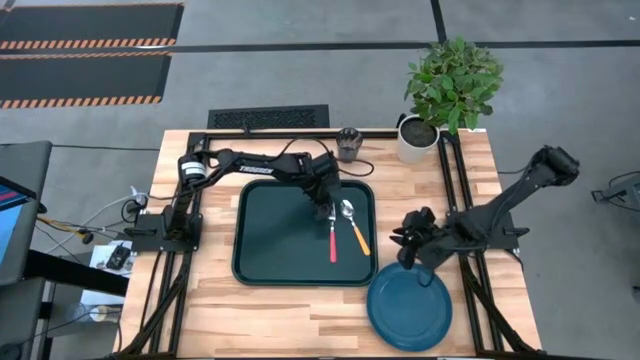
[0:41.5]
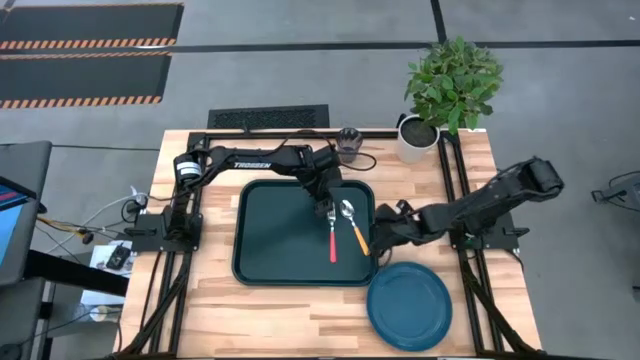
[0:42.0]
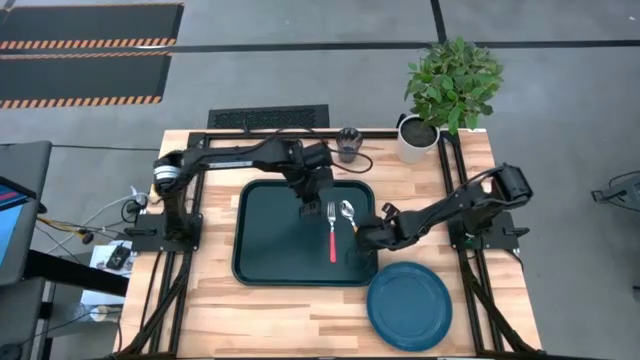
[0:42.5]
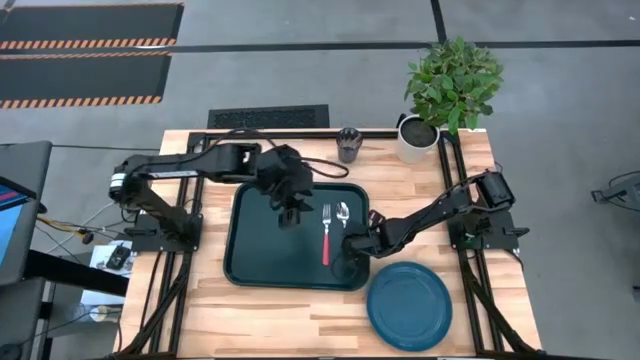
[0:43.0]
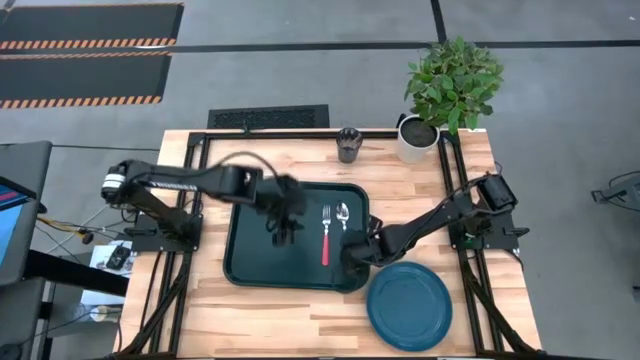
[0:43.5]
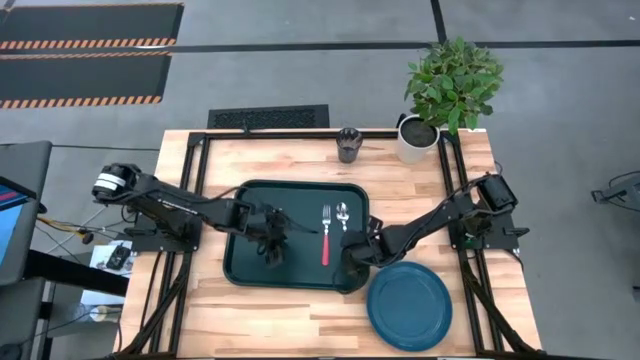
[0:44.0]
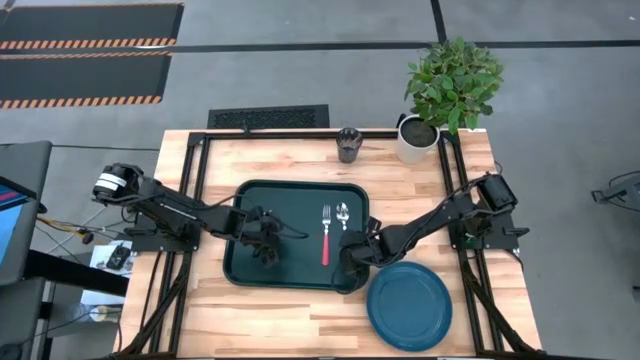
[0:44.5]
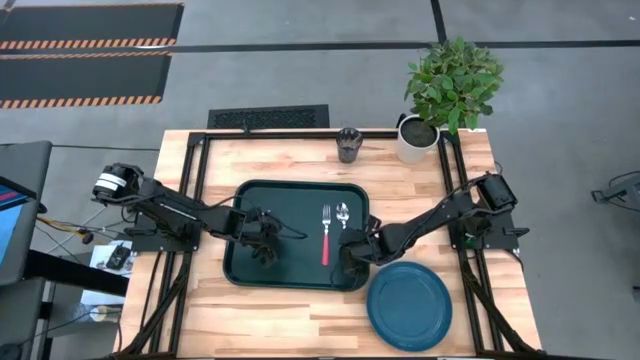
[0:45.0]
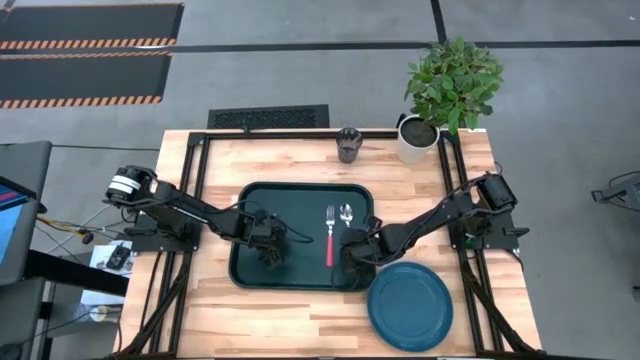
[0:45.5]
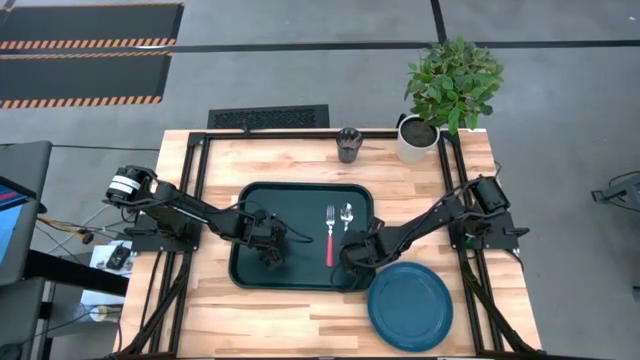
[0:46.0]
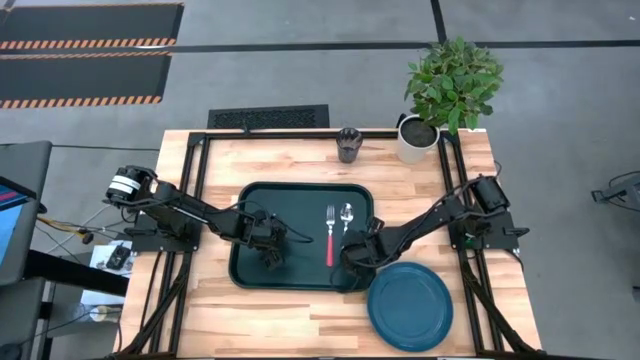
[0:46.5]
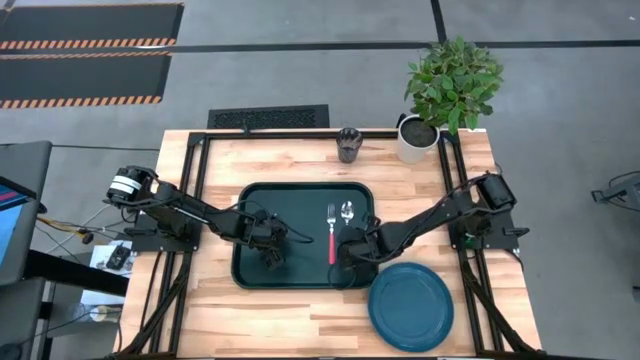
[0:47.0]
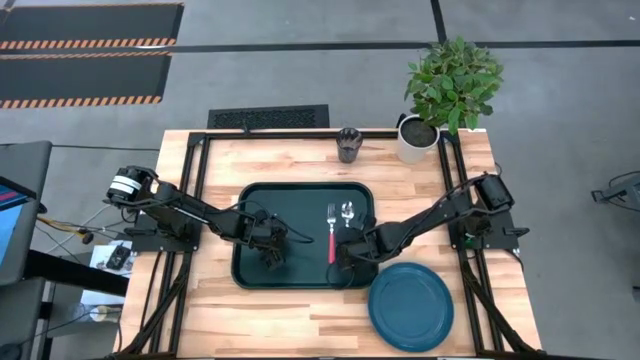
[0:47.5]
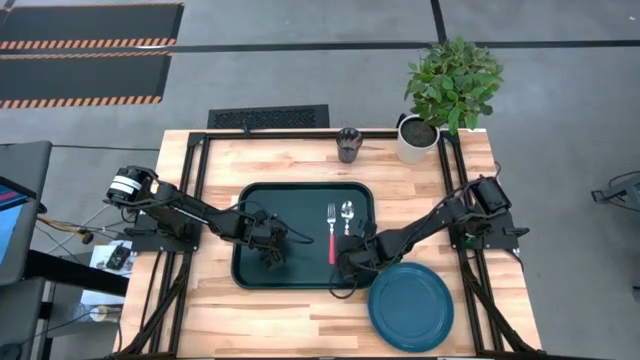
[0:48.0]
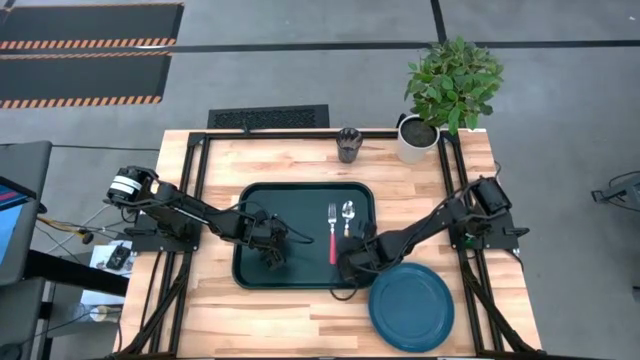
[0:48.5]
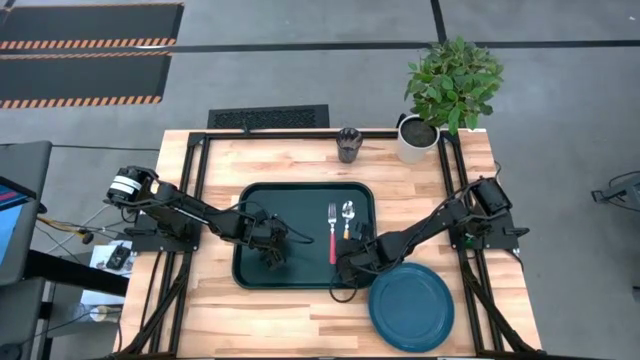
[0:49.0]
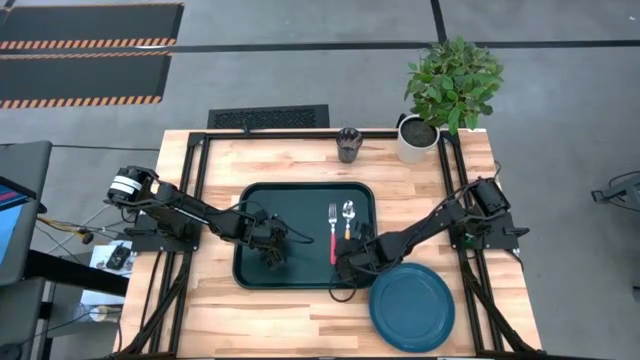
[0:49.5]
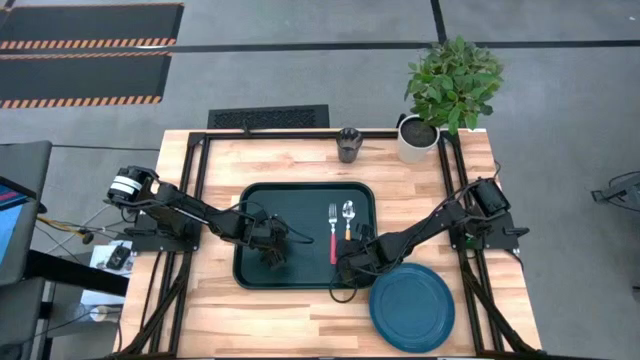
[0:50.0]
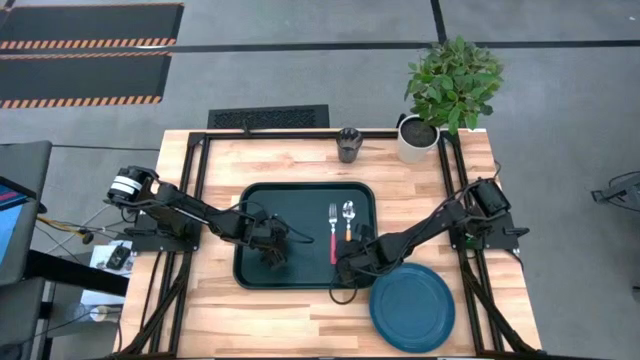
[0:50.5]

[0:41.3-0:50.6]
Task: Pick and place plate/cup/fork/spoon on tray
Adjust the yellow spoon on the black serving tray

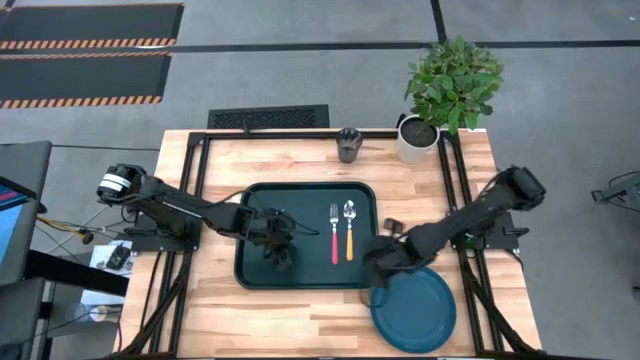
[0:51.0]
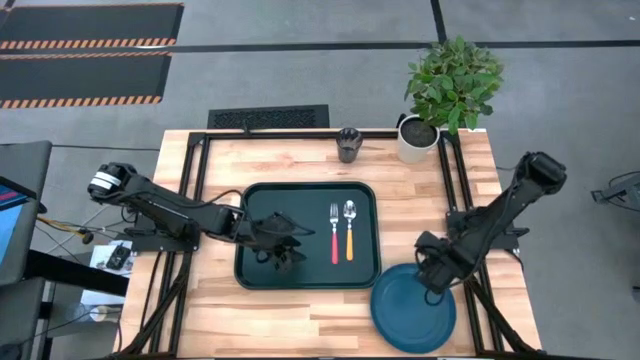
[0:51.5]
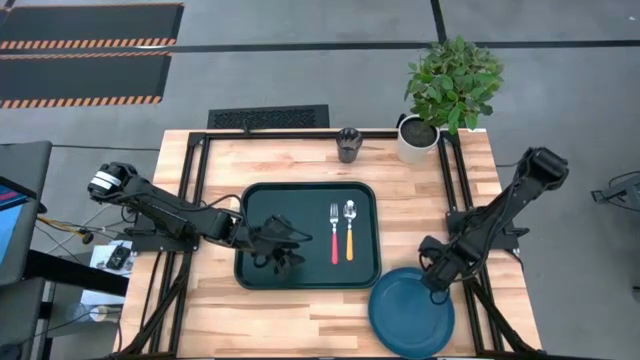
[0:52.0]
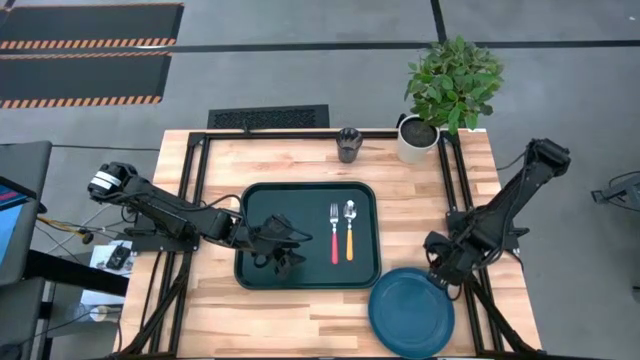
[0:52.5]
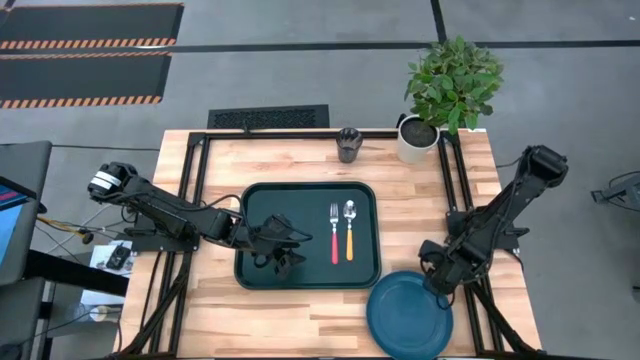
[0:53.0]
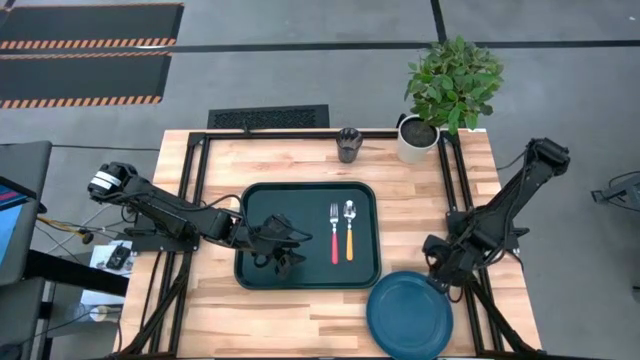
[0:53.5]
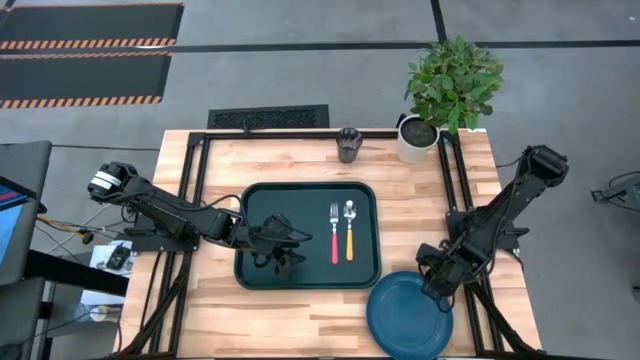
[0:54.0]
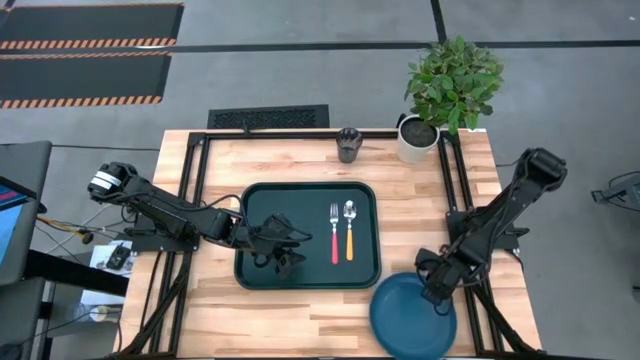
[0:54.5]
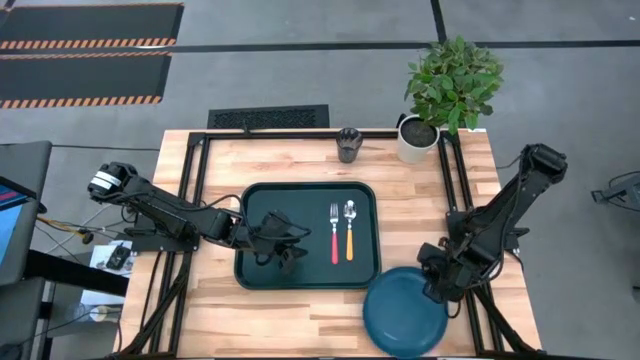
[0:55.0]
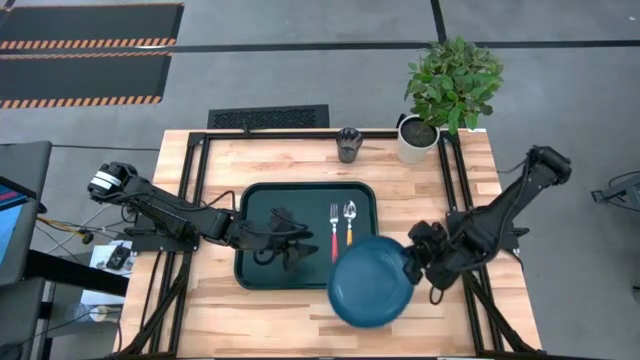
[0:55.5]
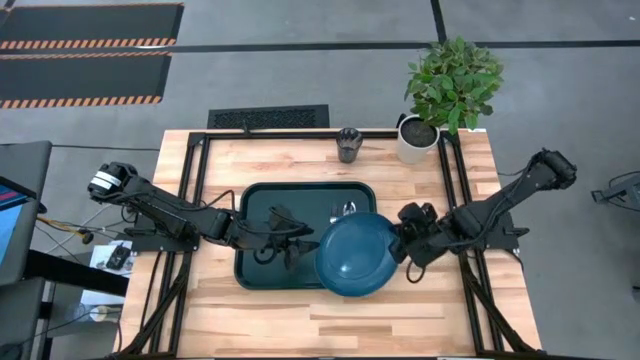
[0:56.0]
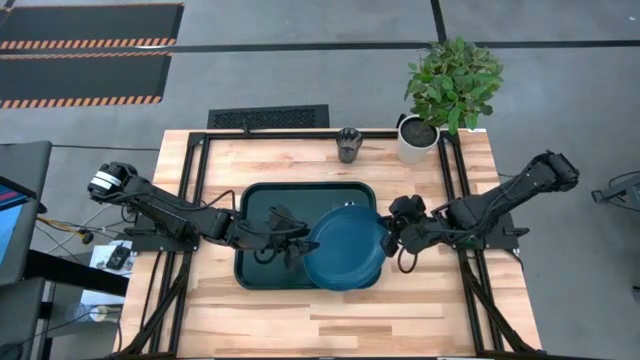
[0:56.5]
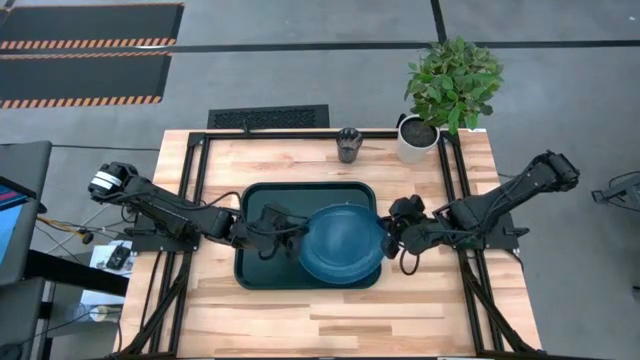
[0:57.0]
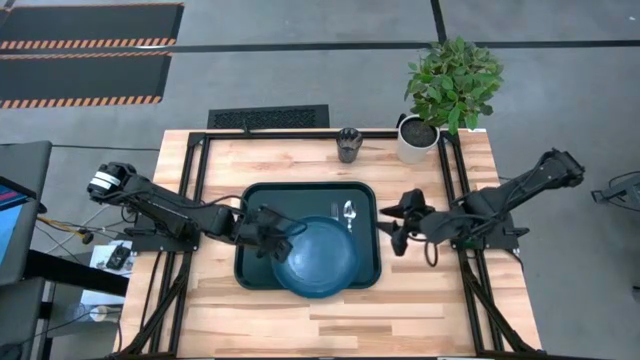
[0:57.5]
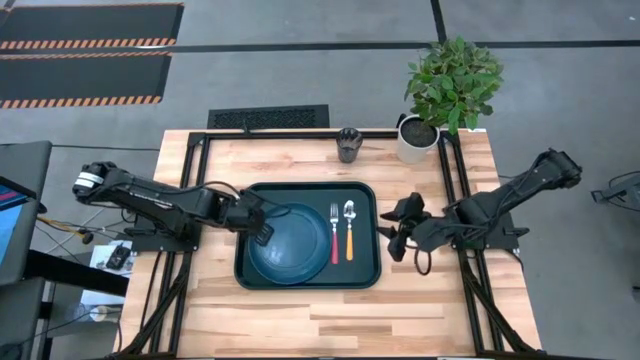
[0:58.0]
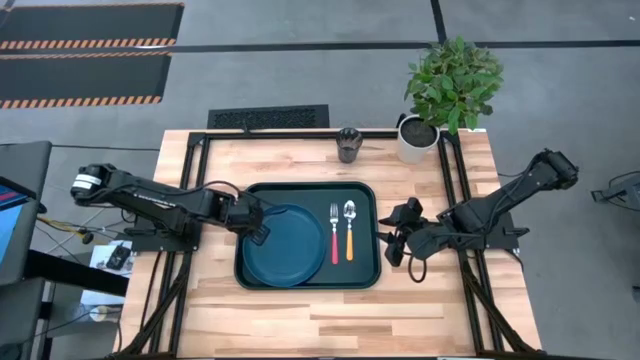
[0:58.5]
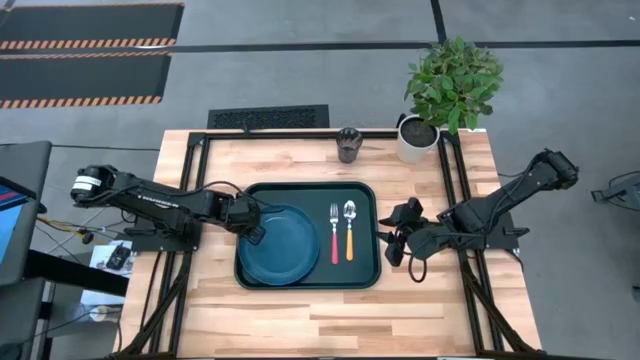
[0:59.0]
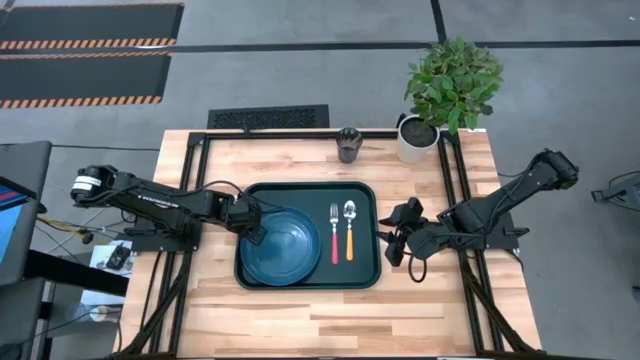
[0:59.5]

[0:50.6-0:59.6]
Put the dark blue plate on the black serving tray

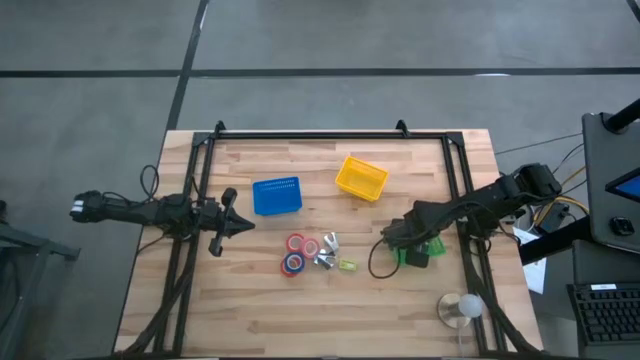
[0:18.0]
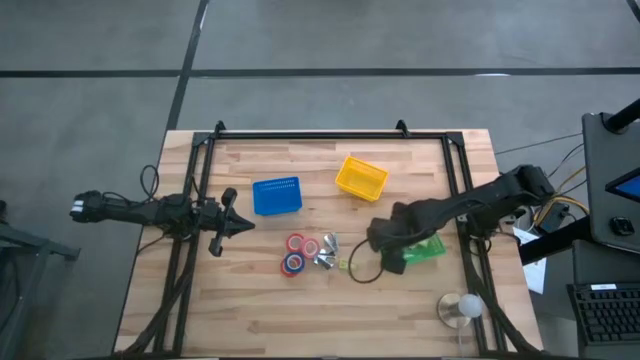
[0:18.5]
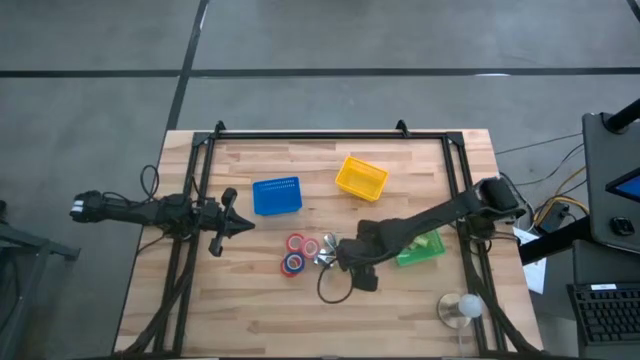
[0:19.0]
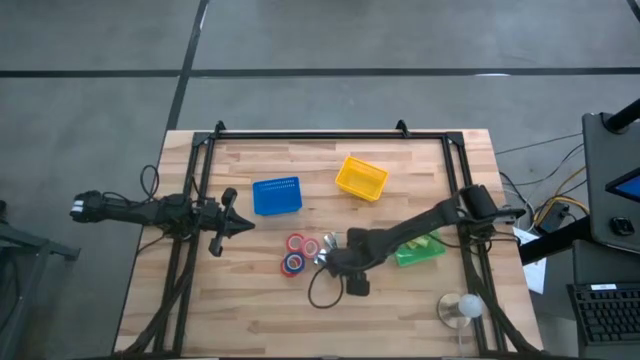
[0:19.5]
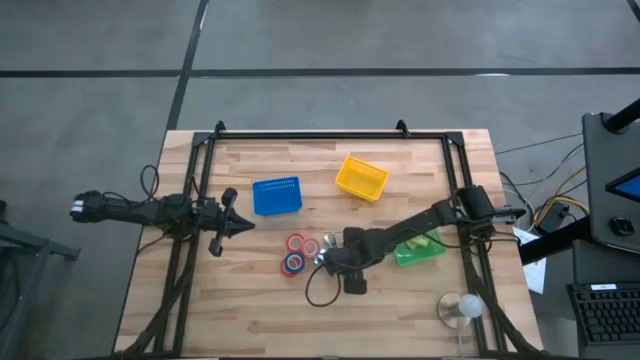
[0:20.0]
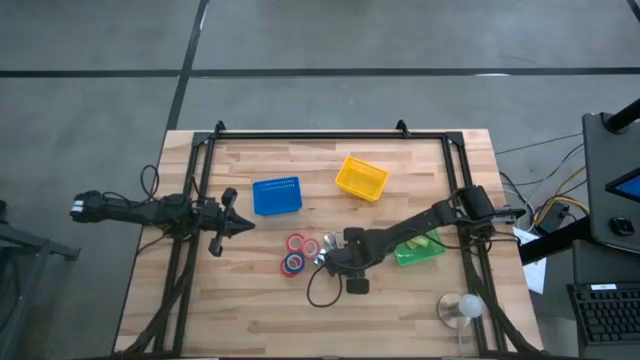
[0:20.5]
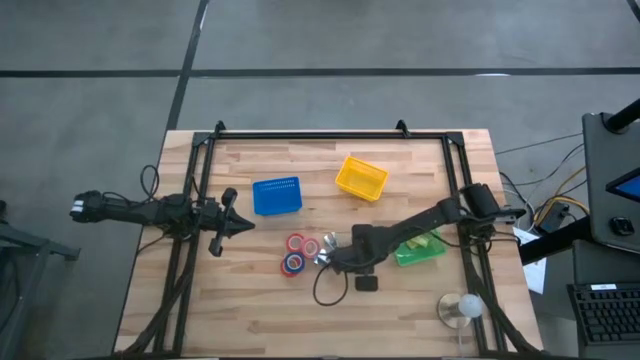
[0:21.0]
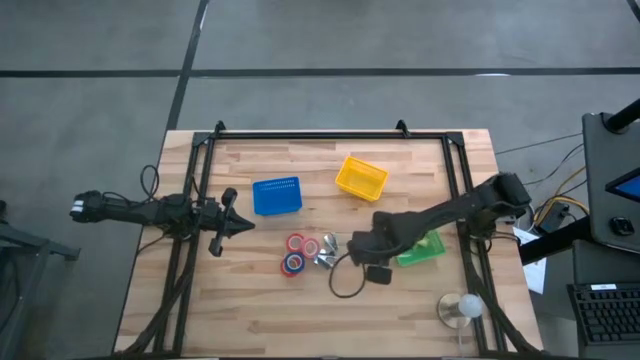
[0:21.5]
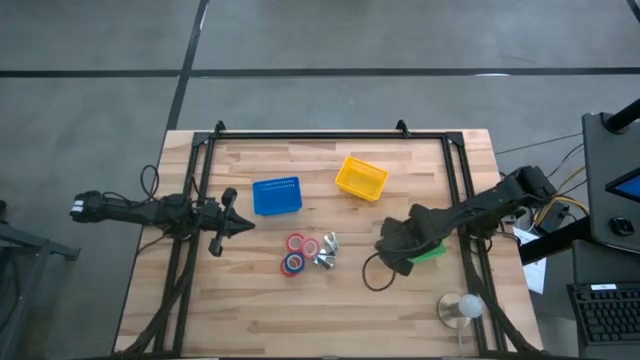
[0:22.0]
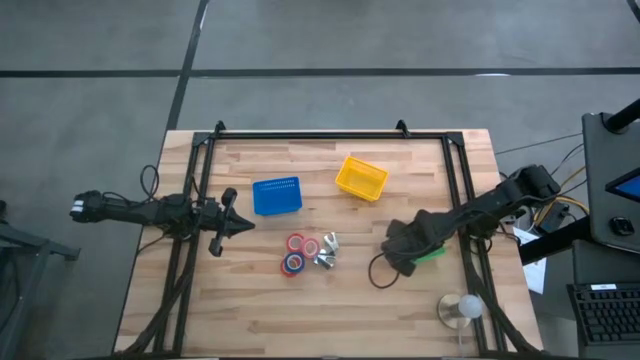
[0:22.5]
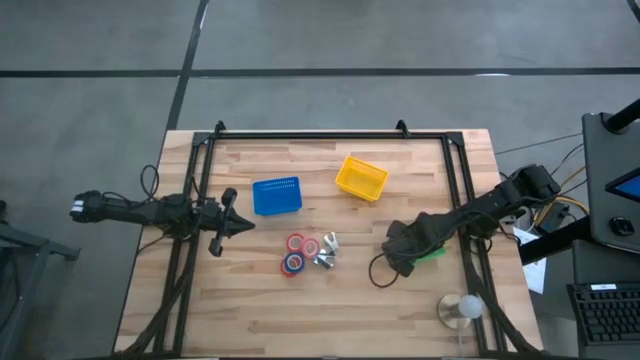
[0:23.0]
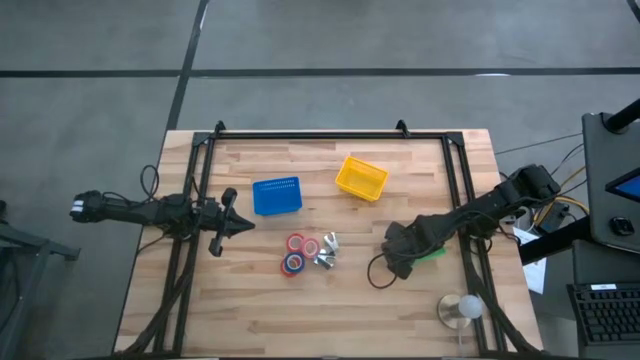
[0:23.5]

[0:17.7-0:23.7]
Task: Pick and place Stapler, Stapler remover, tape
Put the green staple box into the green bin
